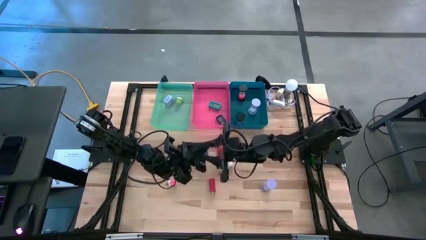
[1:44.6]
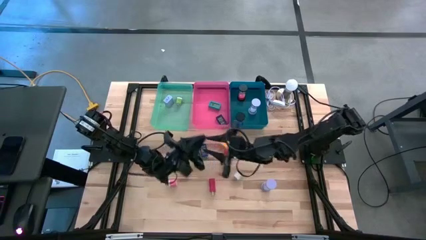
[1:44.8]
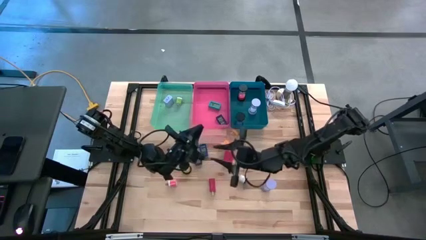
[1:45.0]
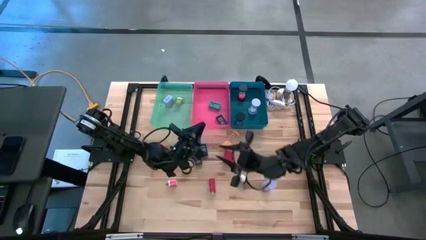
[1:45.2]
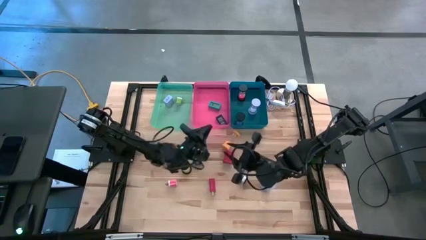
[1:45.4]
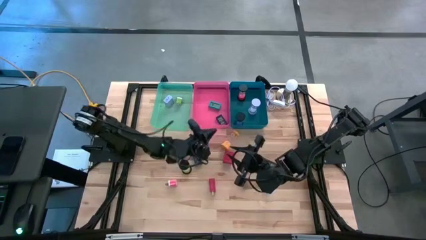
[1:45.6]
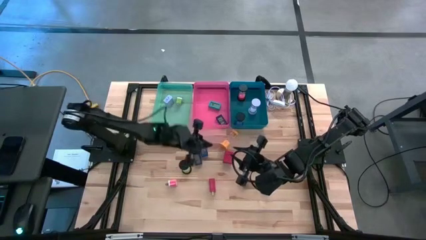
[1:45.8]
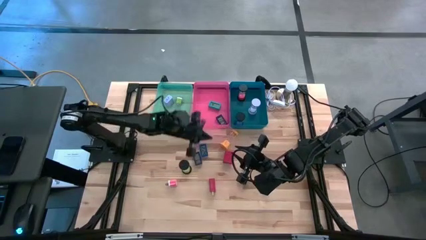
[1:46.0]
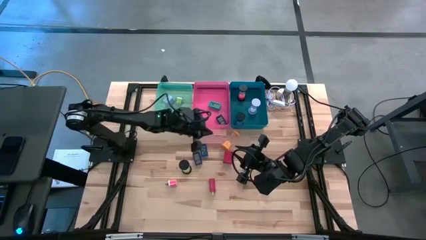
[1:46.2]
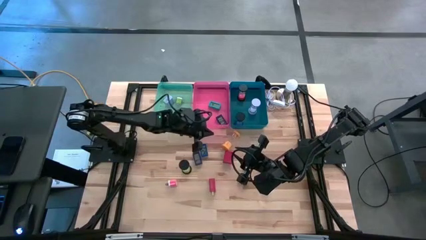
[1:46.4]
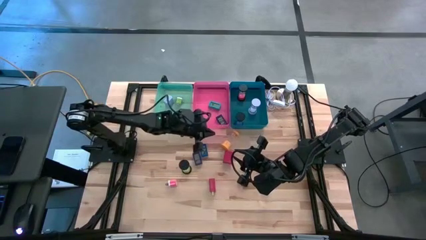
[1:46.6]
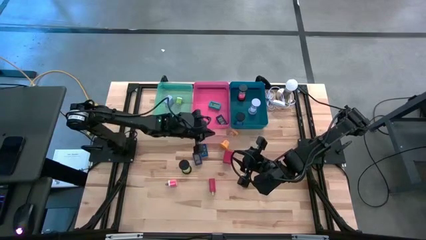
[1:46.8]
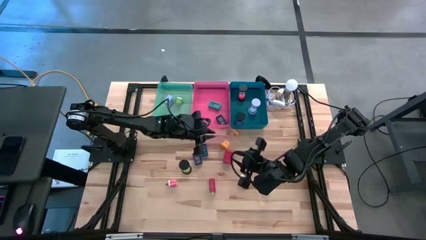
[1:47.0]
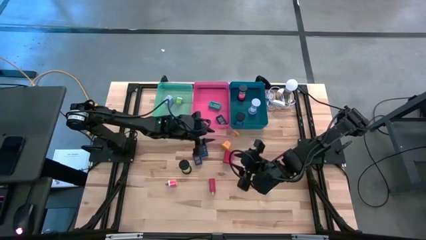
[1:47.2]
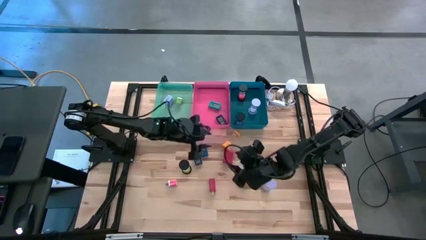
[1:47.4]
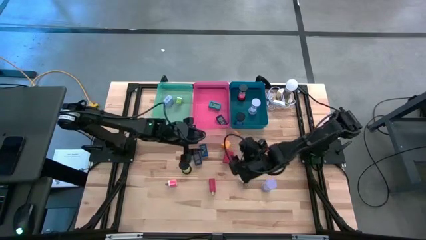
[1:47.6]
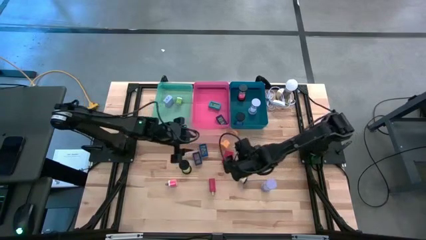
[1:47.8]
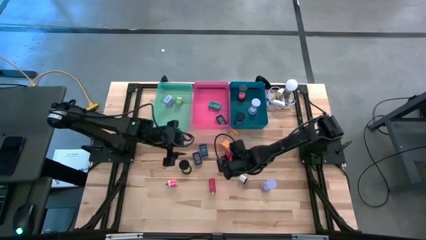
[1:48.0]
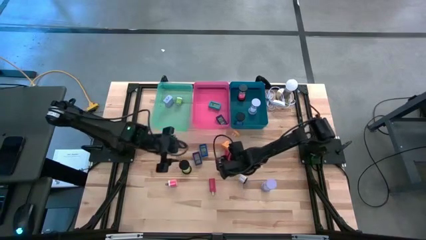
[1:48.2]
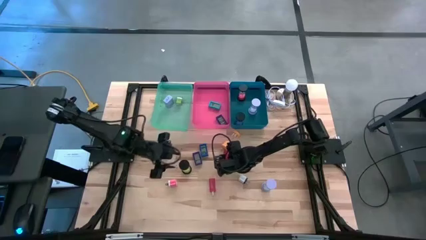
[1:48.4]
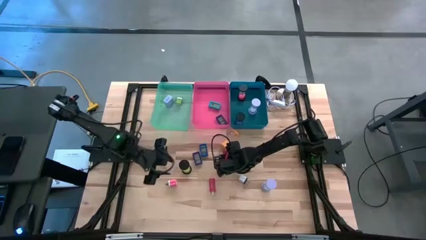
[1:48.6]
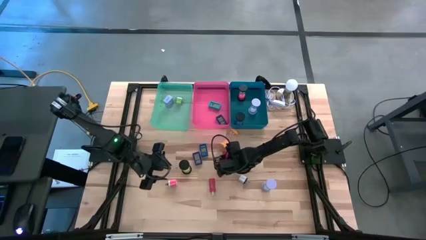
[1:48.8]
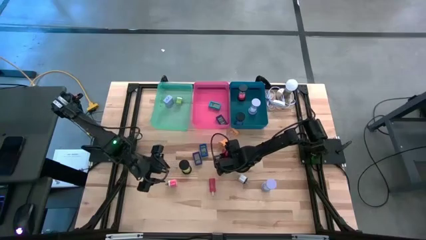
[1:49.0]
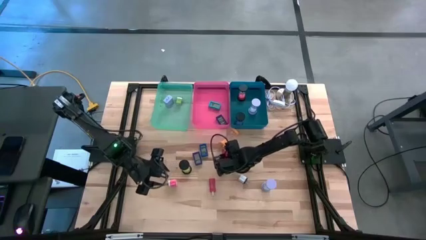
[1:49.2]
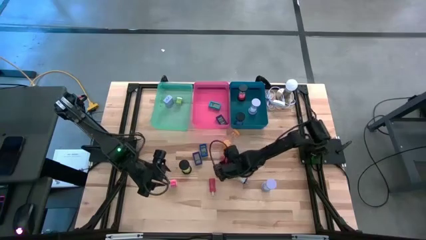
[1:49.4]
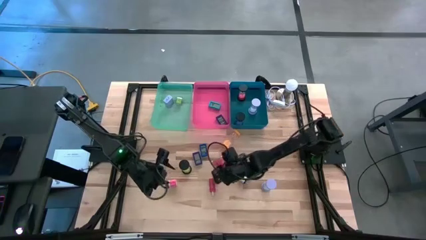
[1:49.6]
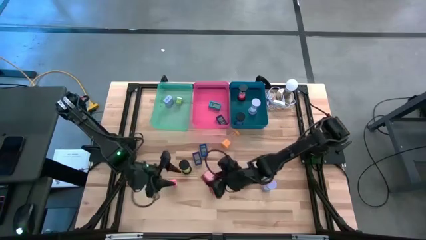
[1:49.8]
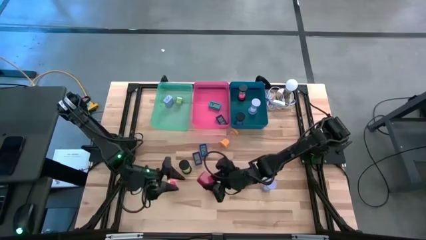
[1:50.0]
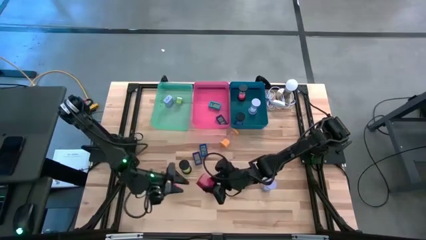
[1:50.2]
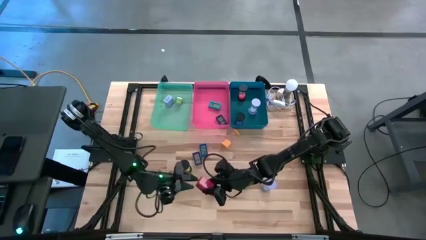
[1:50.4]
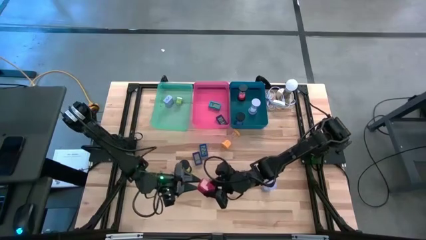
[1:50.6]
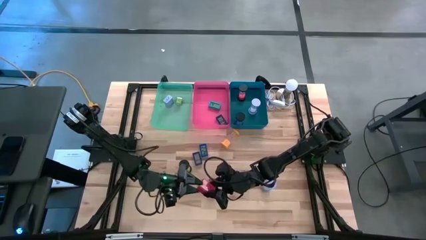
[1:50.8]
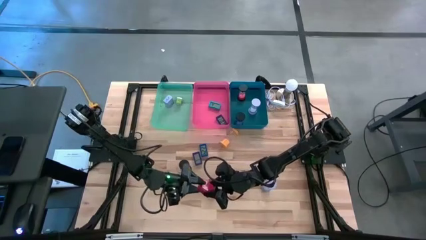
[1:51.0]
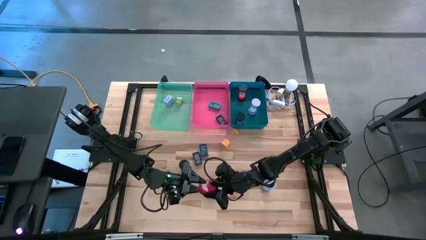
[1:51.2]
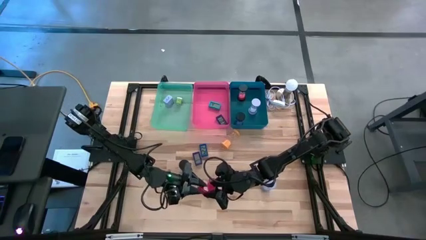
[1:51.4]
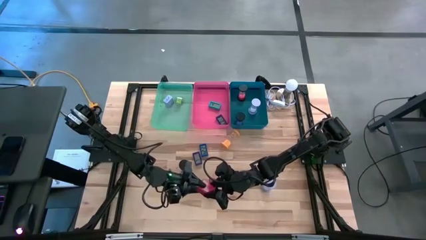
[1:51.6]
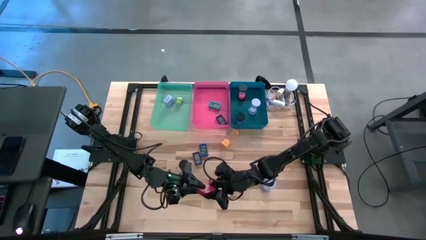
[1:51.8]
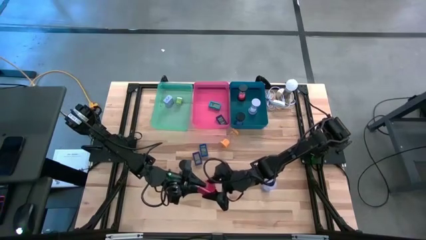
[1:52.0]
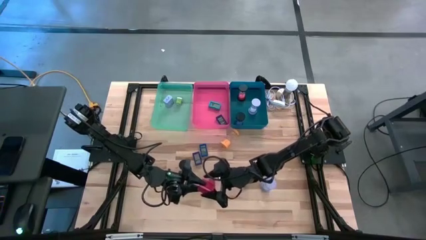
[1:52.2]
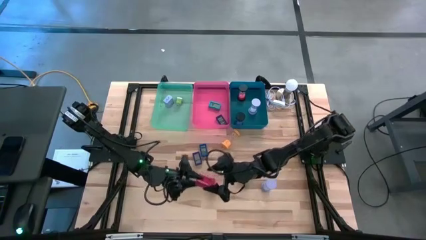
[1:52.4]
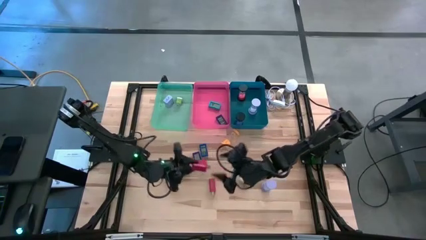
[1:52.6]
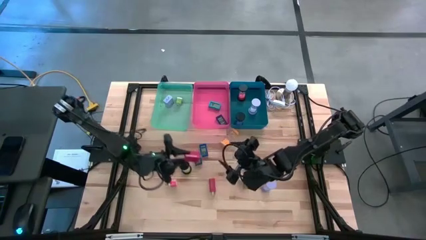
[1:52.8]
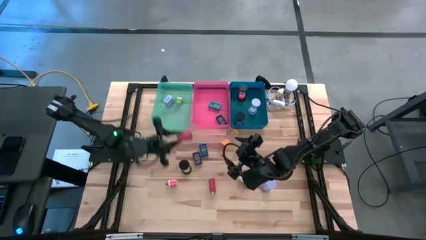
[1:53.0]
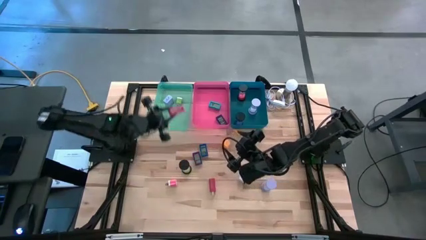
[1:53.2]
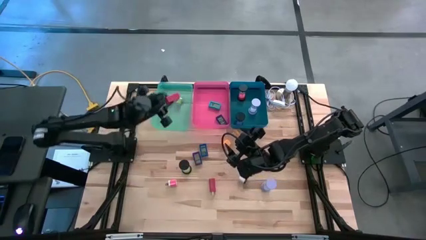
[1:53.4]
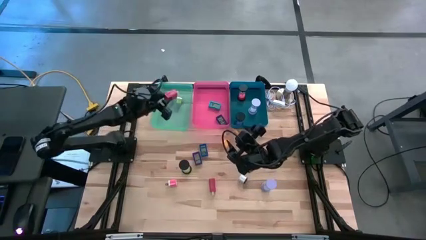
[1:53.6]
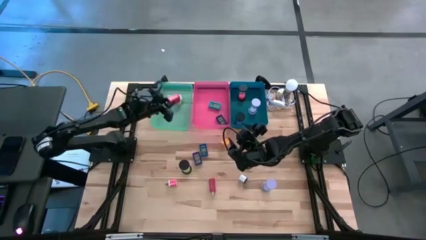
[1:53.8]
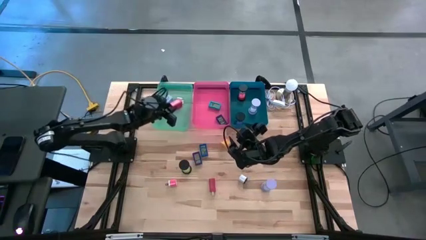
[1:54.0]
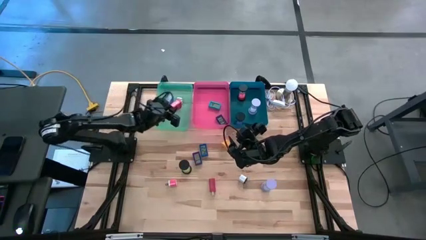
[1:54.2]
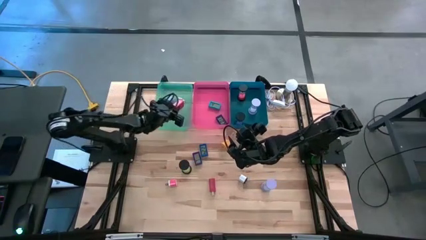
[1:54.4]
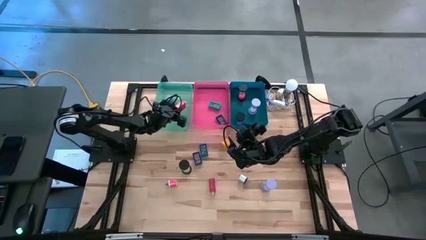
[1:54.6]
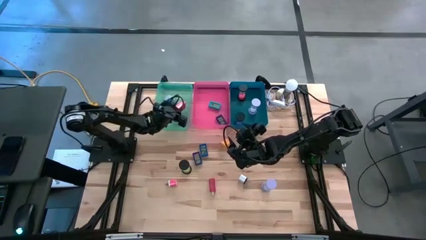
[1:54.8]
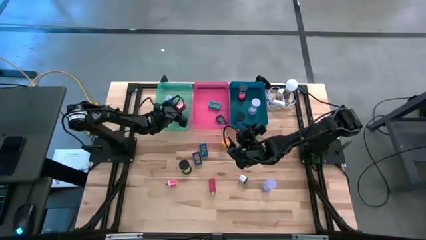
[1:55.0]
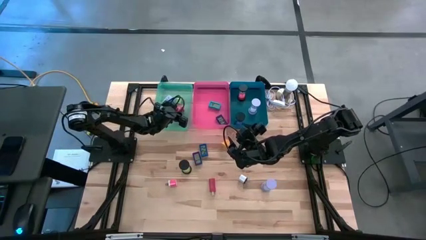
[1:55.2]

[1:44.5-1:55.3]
Task: Pick & Place Office items
Put the right red adapter into the green bin

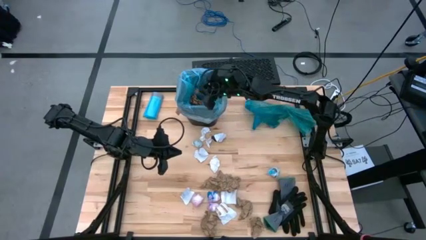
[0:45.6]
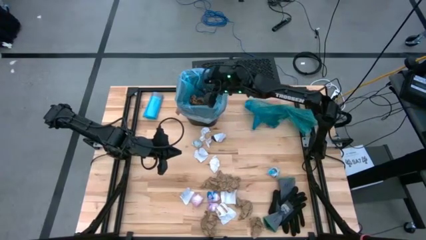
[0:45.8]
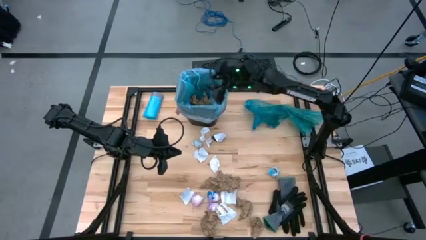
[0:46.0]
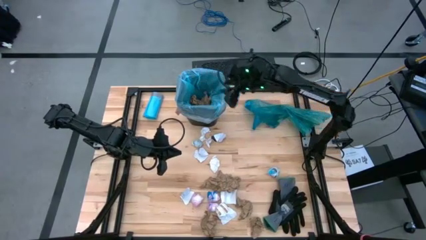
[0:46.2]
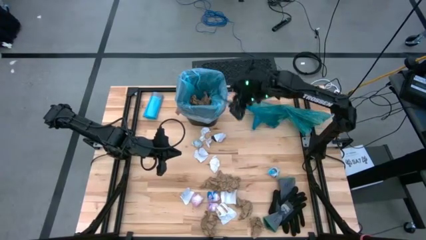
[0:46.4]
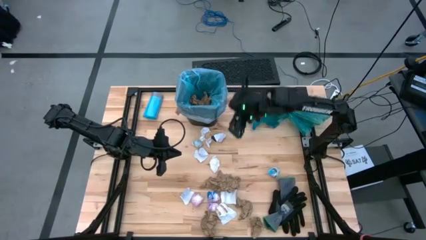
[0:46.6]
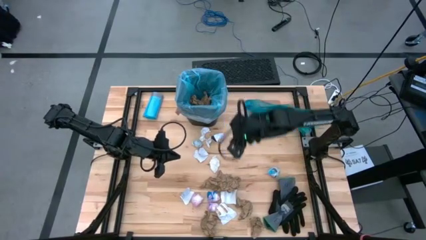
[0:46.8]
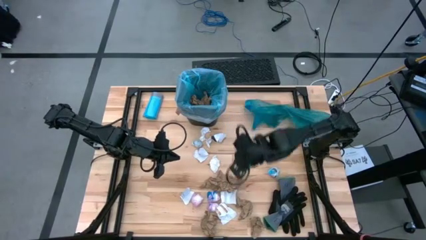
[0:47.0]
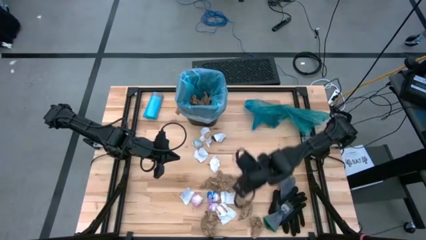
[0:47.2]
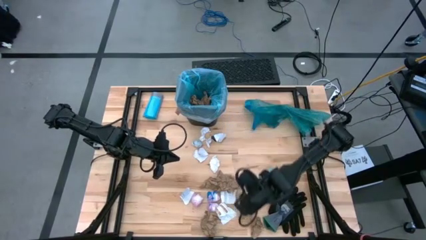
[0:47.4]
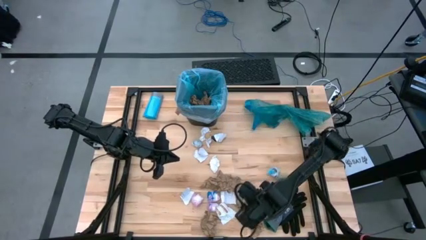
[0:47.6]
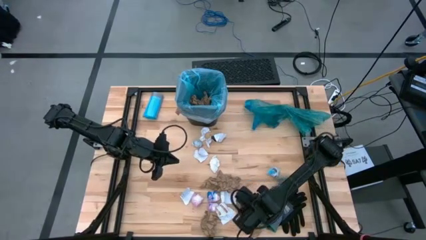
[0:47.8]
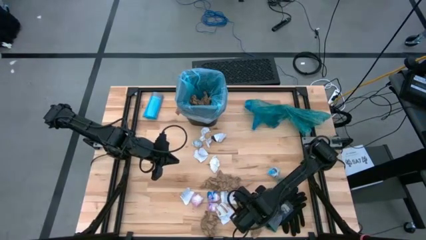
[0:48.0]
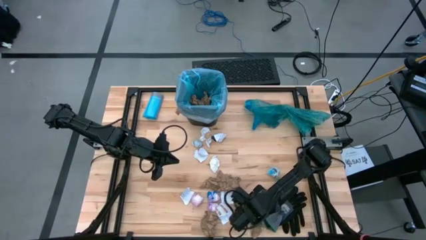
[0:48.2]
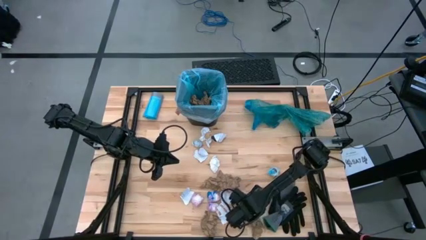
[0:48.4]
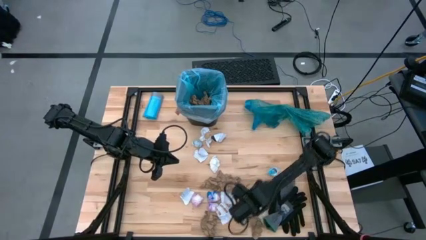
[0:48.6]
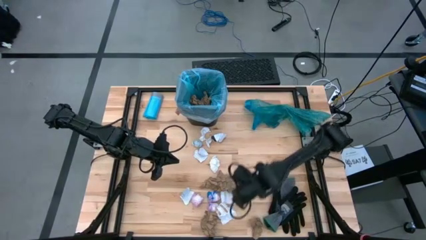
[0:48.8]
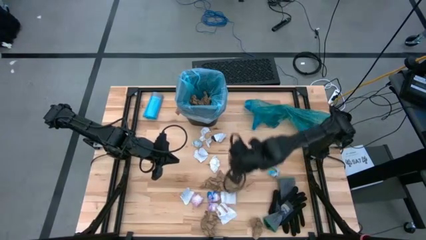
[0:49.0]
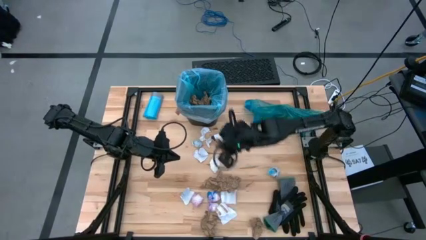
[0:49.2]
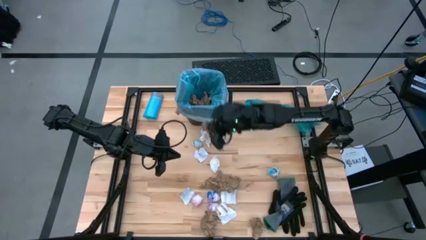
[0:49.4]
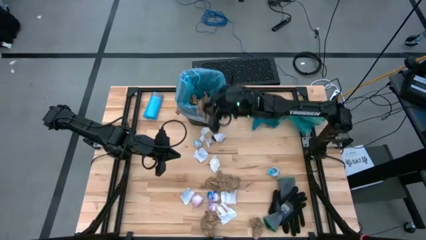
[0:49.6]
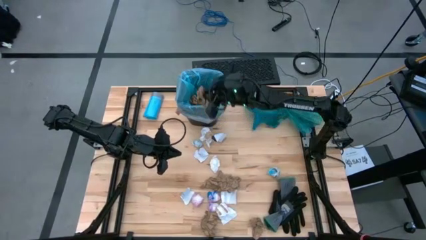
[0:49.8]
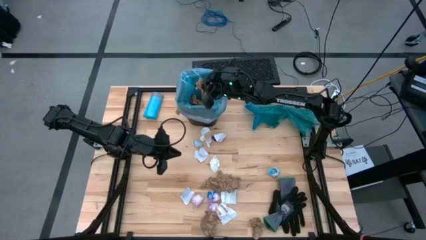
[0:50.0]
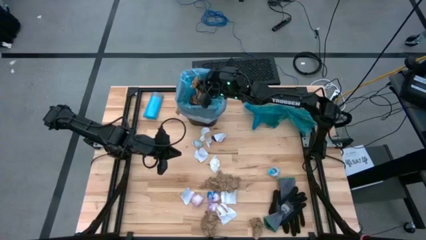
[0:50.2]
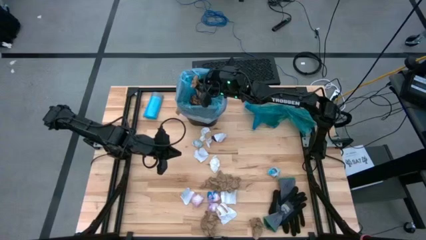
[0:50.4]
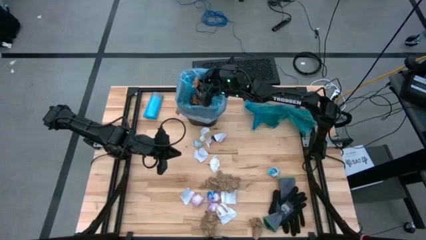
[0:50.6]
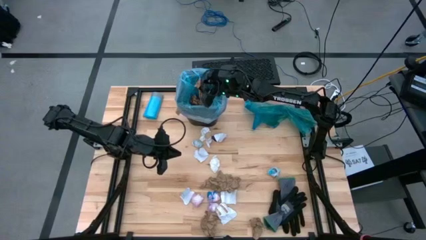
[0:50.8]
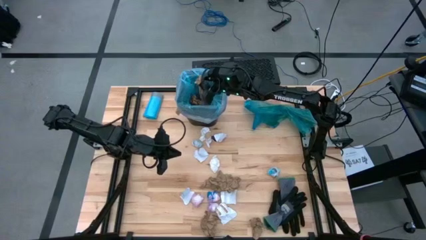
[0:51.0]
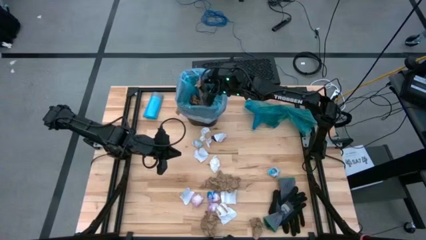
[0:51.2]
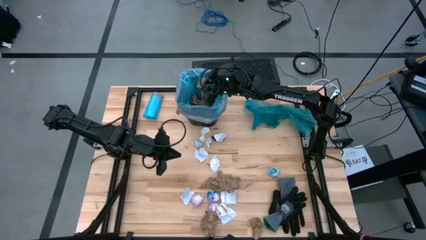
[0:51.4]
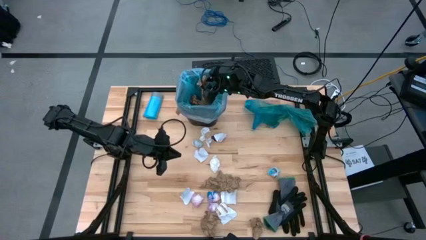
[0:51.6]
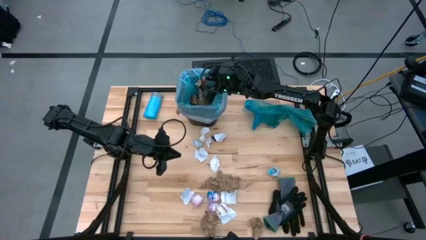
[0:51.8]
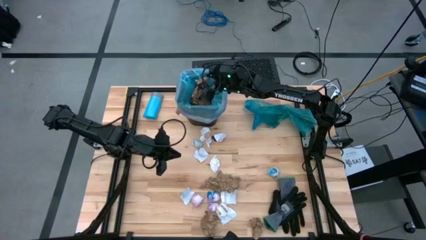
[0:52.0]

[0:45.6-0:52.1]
Task: place trash/remove bag and relplace
Put the brown paper trash into the trash bin

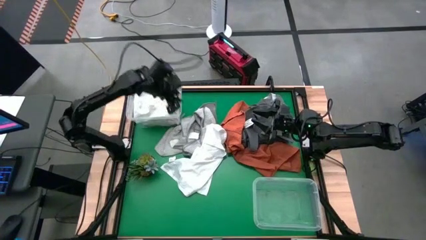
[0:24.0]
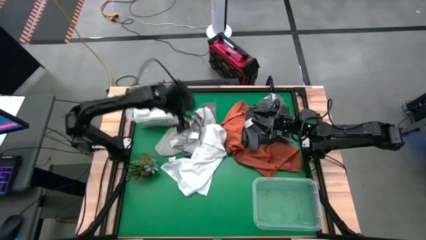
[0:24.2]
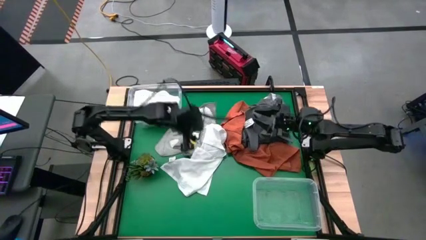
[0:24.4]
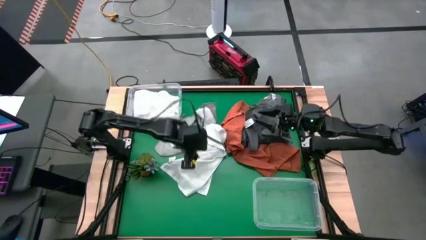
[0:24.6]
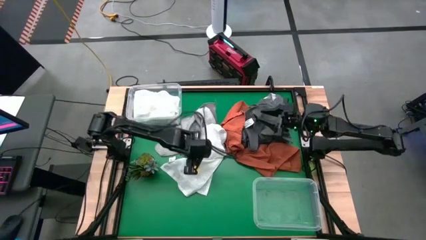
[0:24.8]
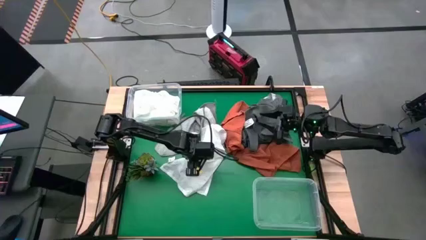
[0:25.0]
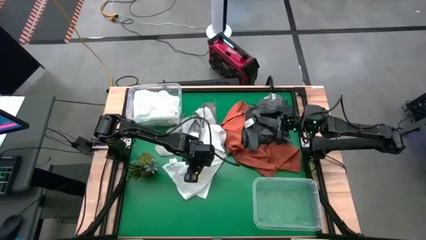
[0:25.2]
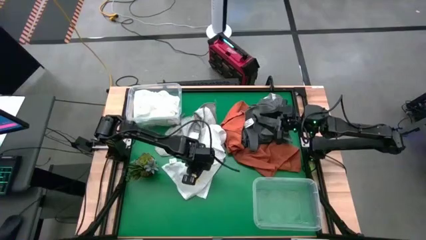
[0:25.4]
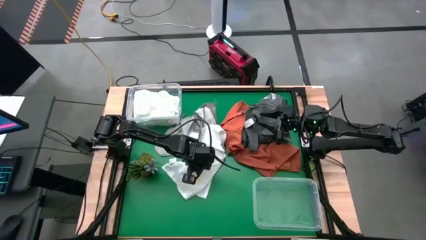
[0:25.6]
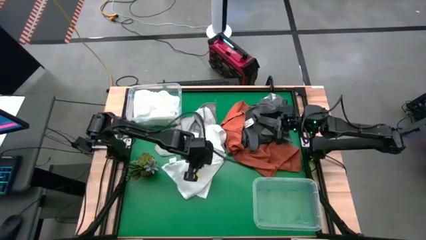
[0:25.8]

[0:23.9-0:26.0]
Task: Sort towels by color in basket
Put the white towel into the top transparent bin
